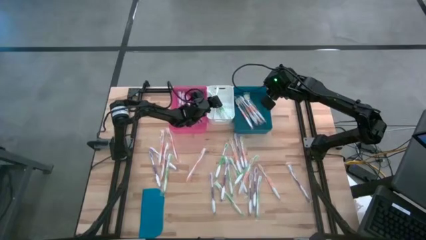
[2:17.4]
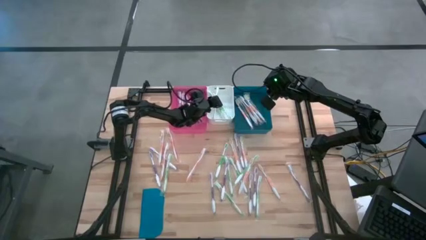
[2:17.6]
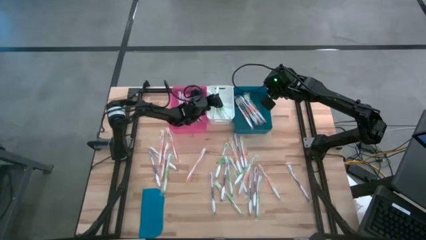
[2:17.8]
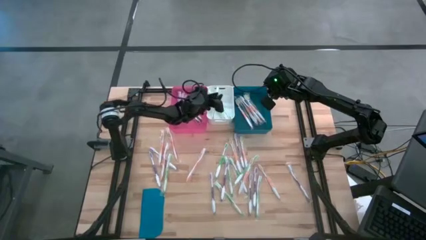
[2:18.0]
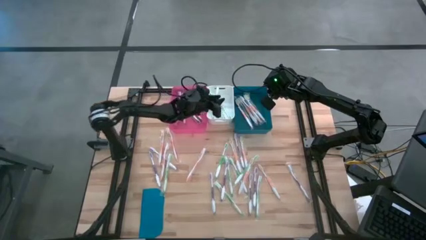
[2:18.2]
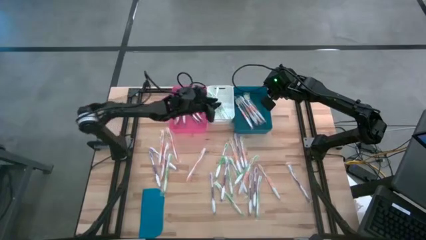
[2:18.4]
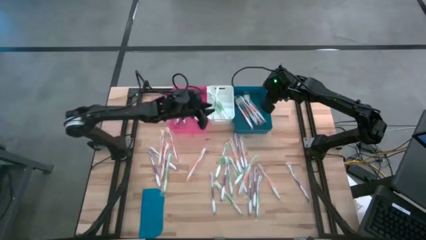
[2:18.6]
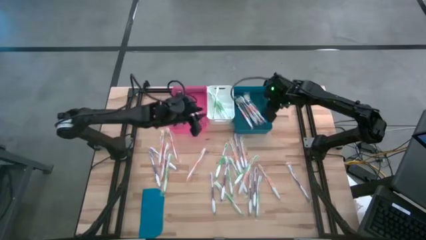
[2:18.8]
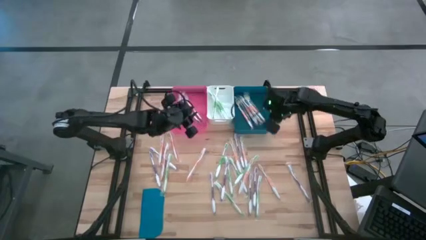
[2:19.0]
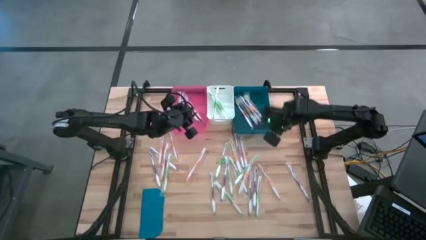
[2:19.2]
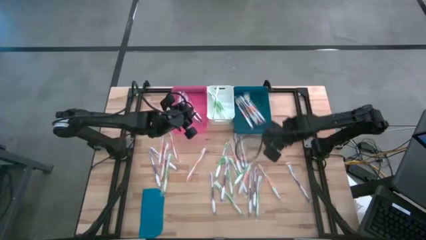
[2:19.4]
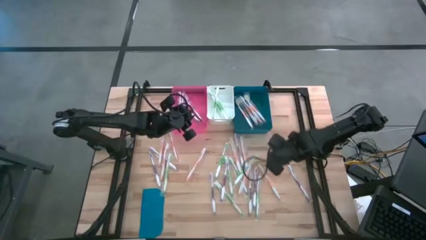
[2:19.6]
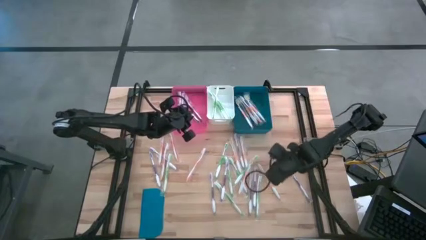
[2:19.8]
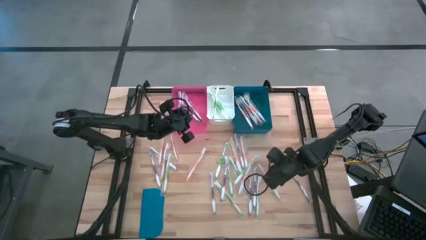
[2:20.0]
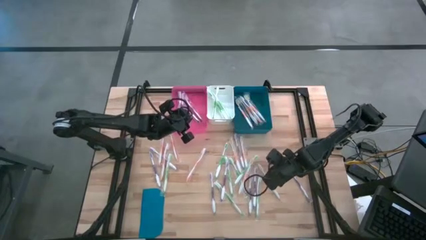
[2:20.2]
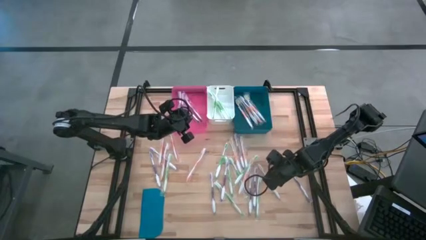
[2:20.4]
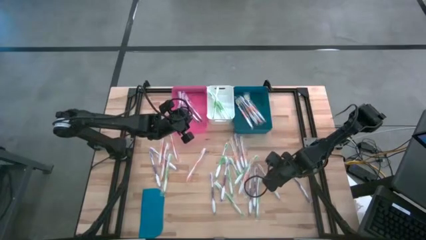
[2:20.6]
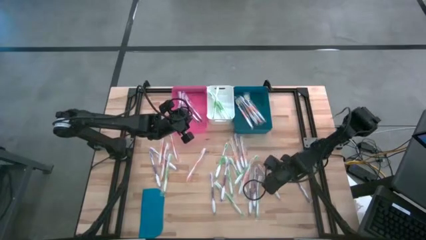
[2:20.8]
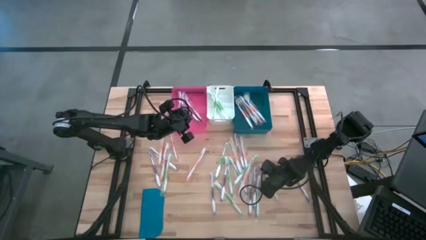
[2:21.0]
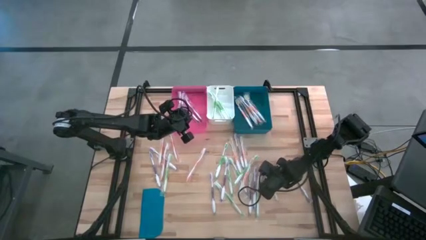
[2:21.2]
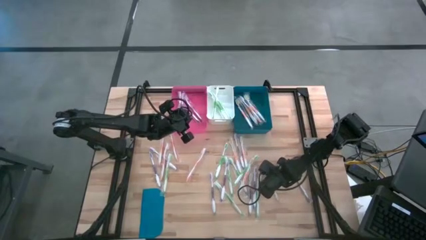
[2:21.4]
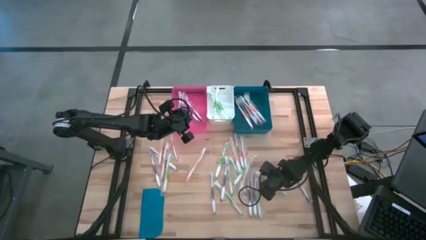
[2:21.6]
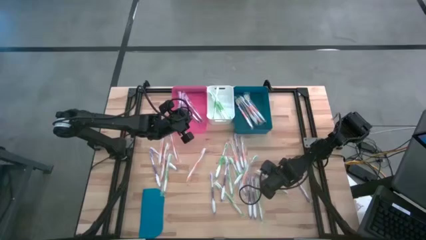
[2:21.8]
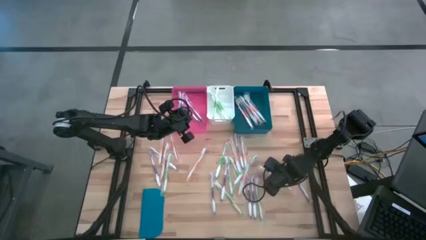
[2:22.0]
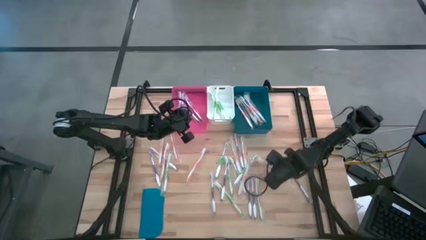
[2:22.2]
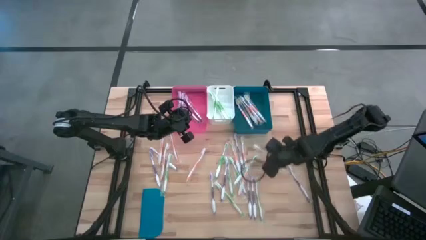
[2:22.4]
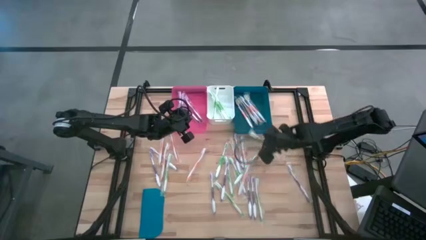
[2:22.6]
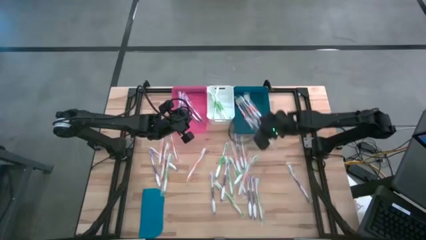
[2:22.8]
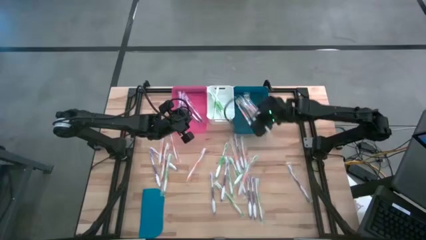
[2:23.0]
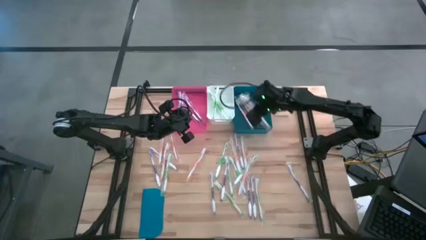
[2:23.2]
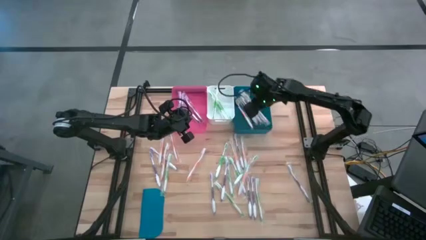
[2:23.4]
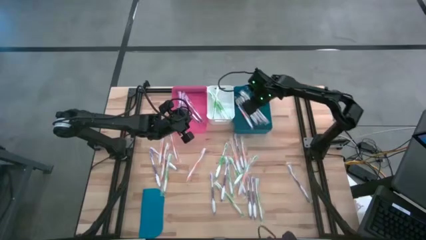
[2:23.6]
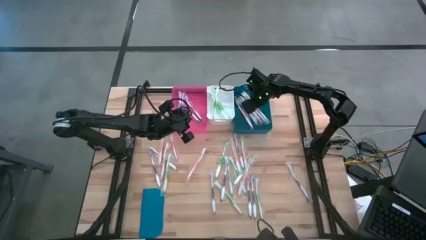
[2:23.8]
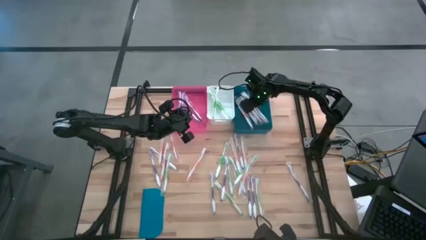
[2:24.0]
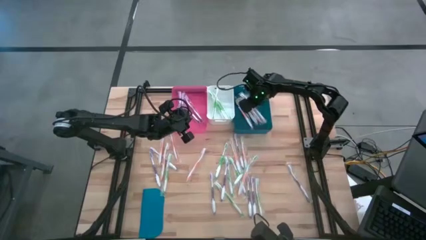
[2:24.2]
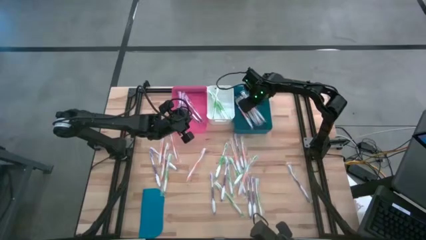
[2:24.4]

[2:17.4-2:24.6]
Task: Pick & Place Toothbrushes
Put the orange toothbrush into the blue bin

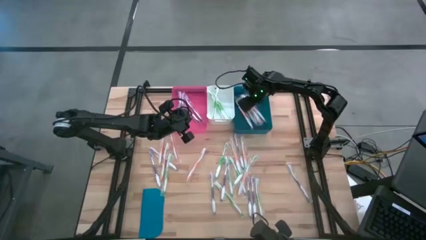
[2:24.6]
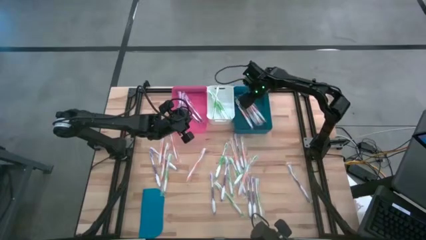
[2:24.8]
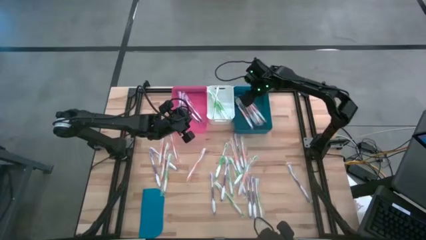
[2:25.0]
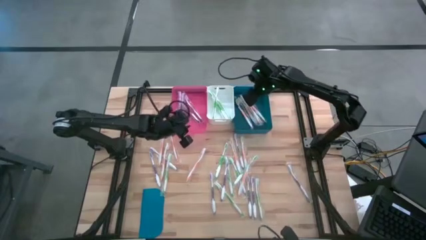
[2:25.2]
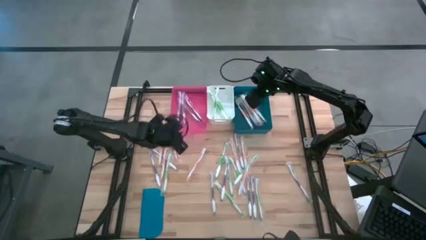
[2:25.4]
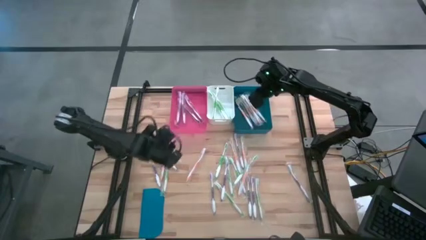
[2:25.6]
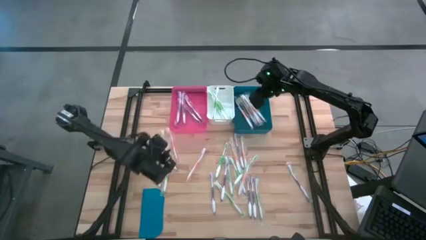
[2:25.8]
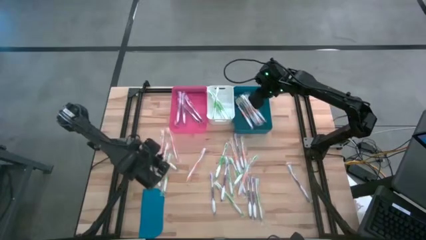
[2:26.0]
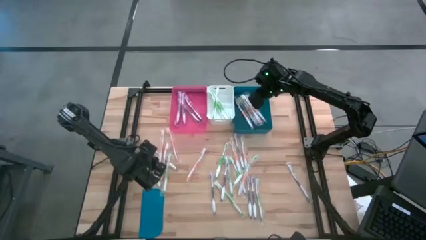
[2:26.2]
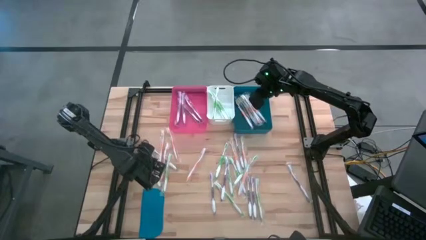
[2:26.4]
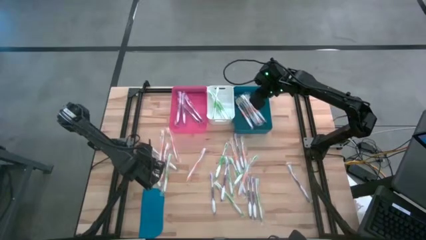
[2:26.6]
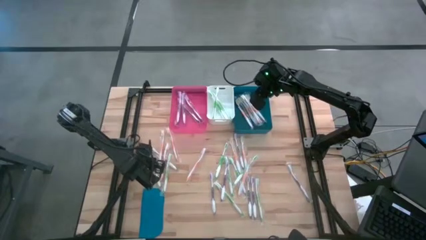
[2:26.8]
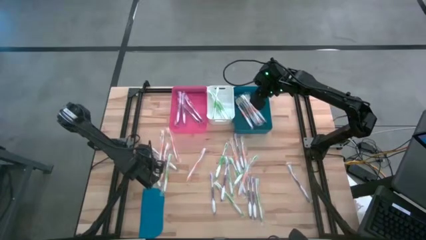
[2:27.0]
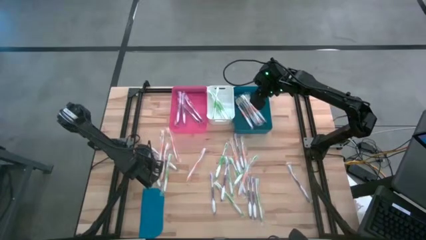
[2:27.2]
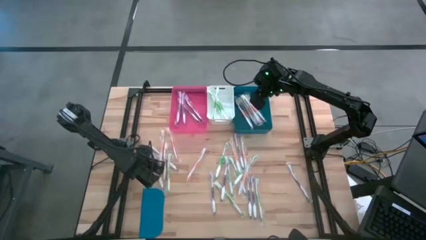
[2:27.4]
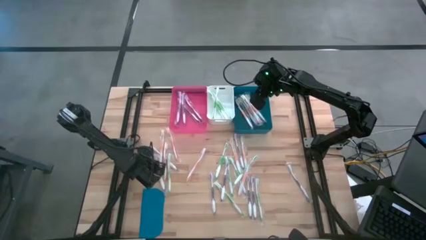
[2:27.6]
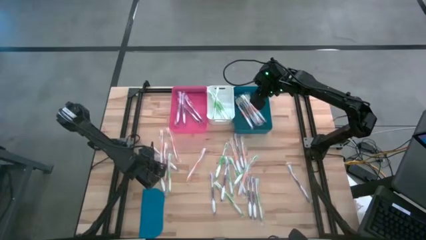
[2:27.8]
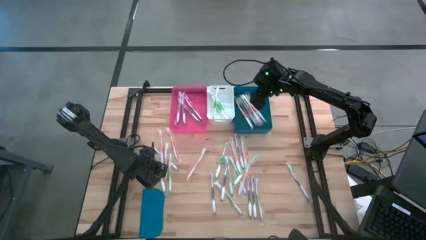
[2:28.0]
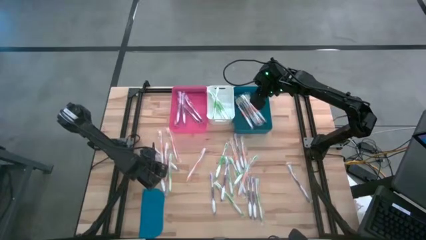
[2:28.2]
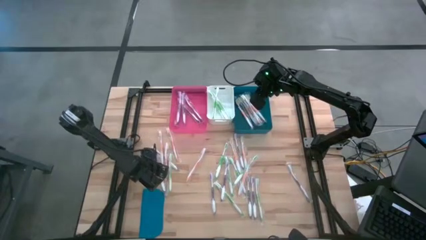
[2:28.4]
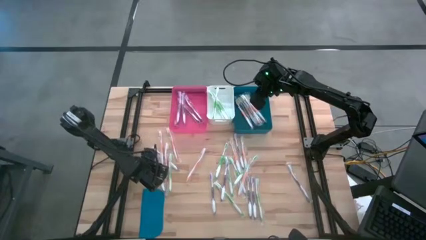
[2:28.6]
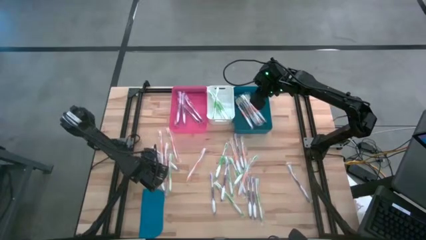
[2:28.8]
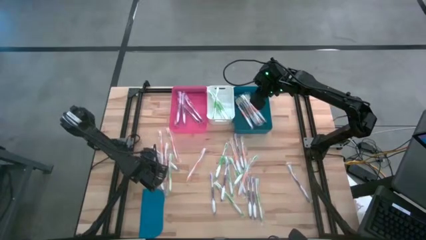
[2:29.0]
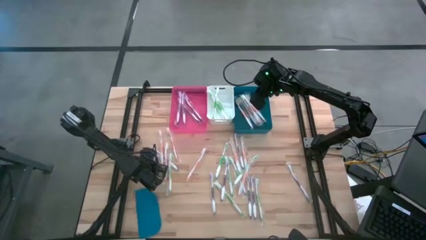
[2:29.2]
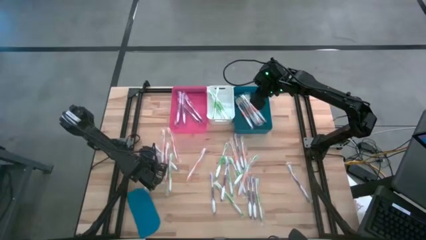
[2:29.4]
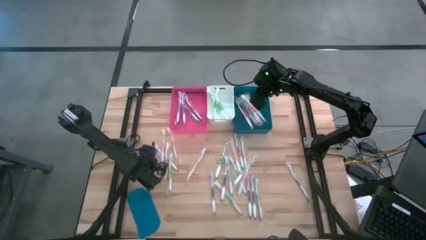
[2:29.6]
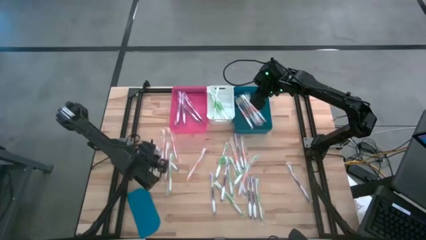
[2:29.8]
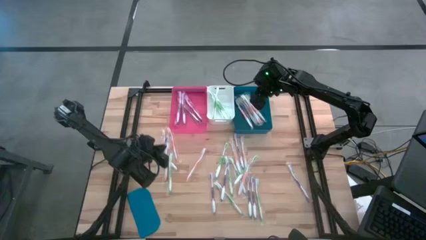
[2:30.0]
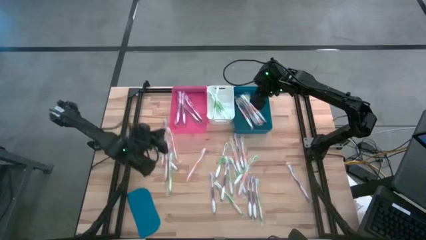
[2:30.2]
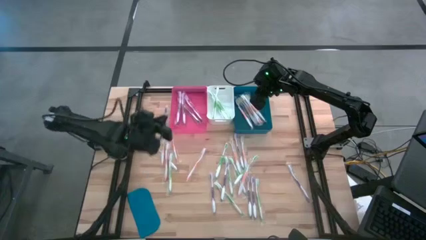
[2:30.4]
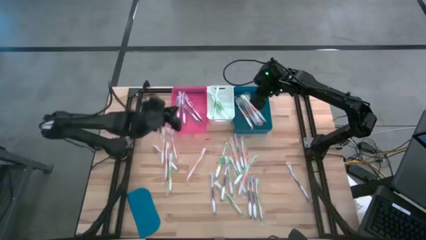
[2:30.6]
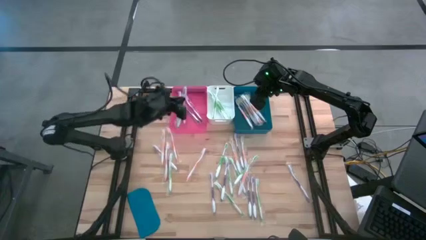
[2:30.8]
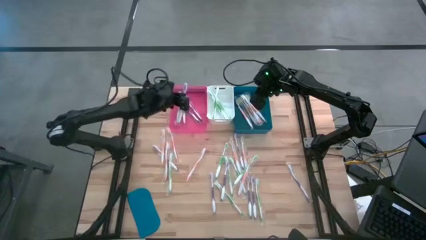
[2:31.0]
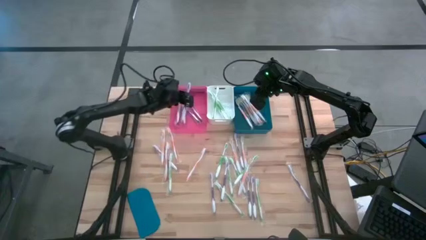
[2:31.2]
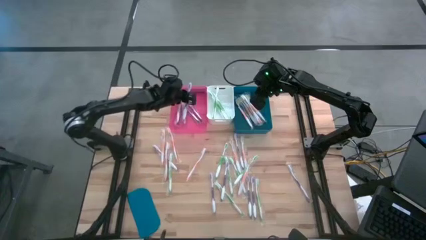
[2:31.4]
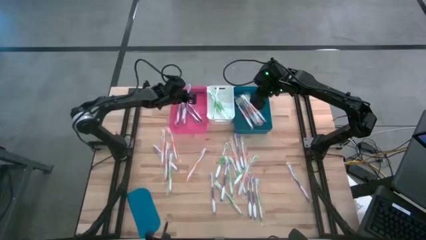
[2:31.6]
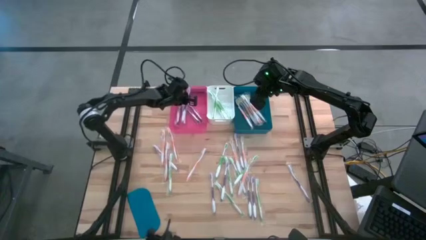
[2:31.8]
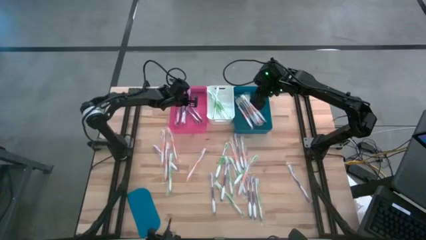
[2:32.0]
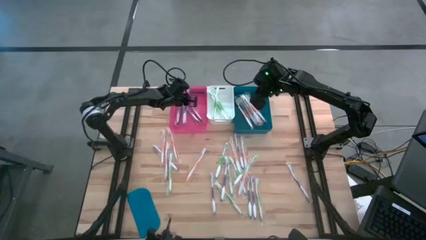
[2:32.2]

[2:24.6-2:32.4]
Put the violet toothbrush into the pink bin
